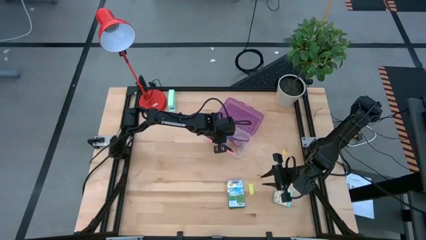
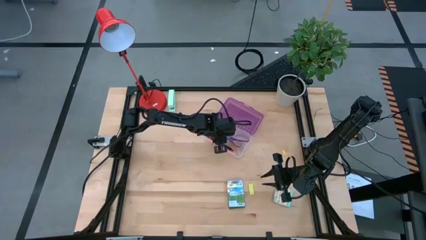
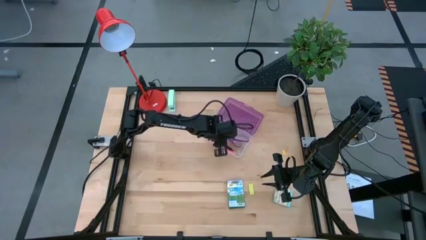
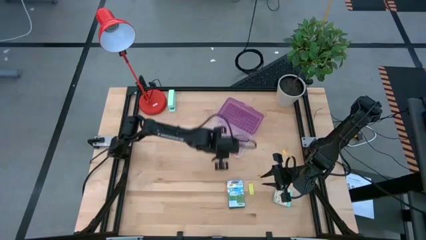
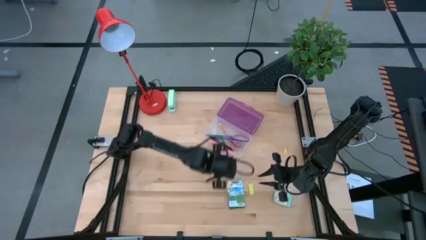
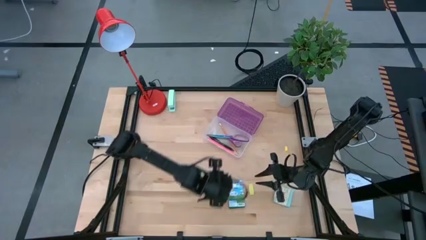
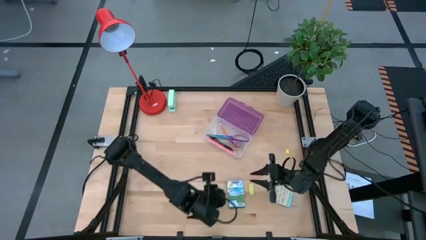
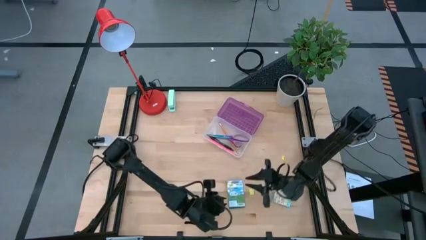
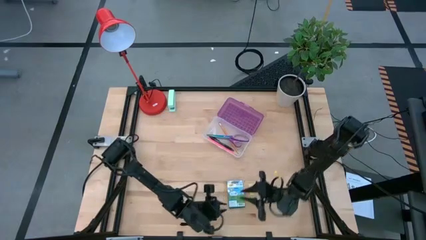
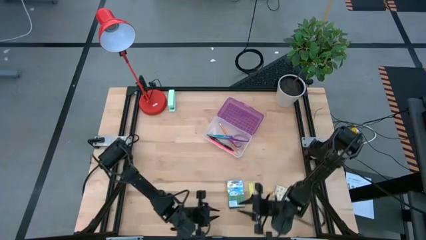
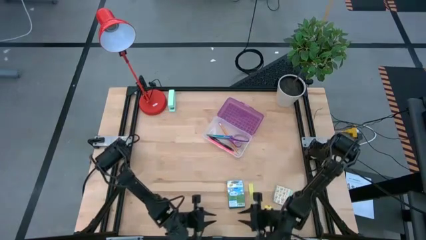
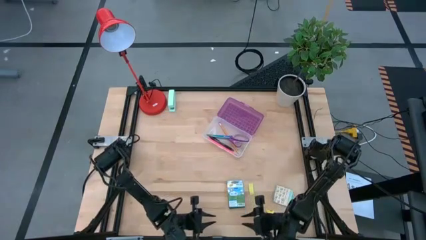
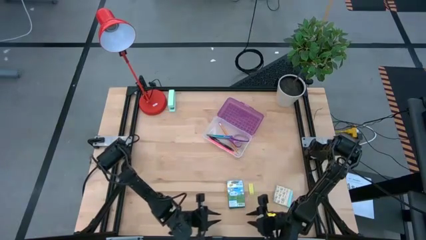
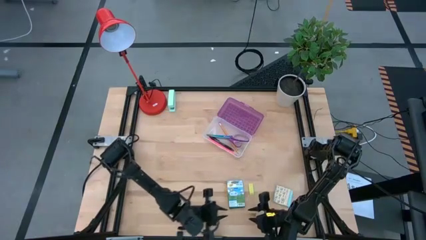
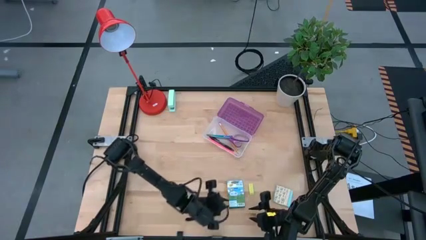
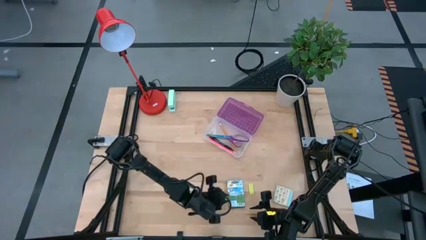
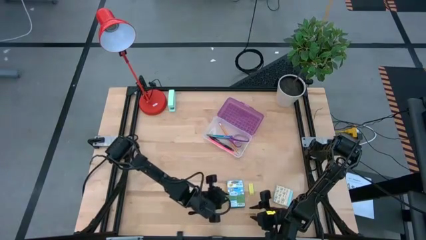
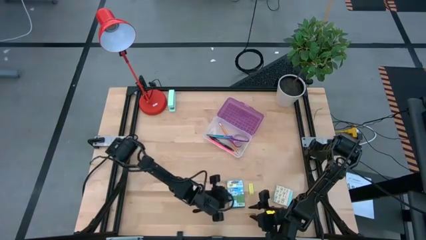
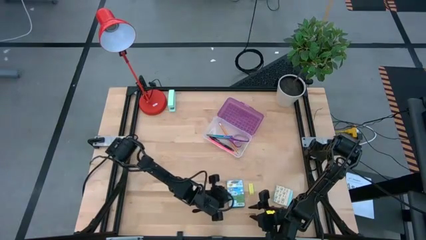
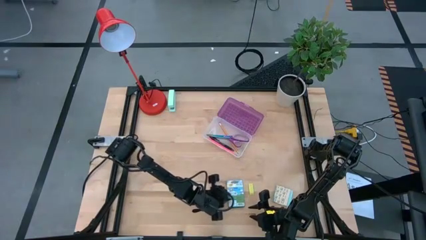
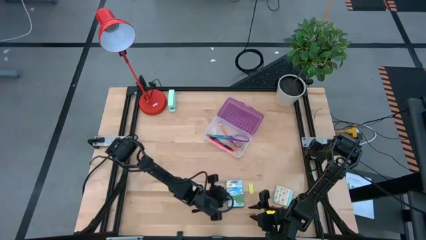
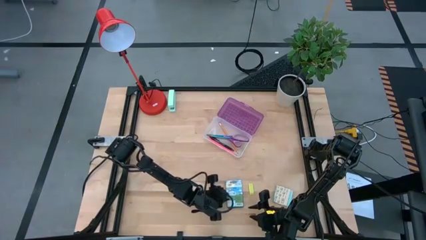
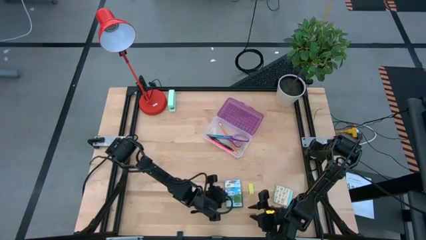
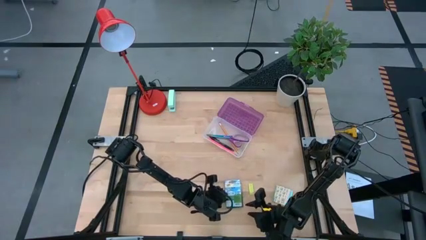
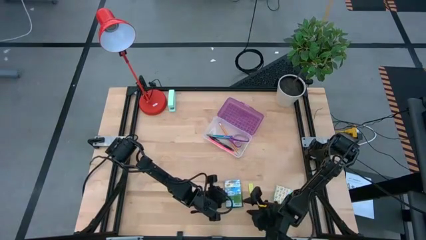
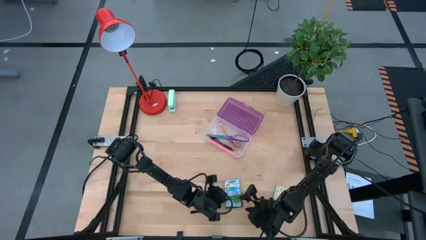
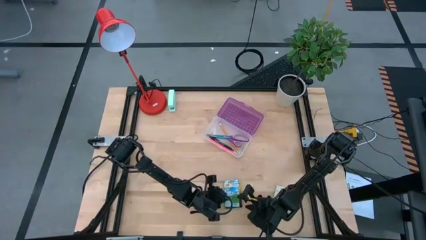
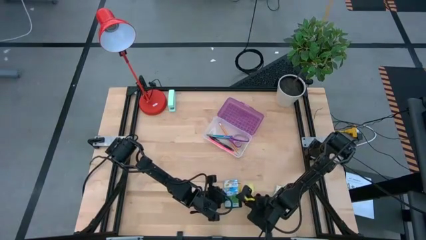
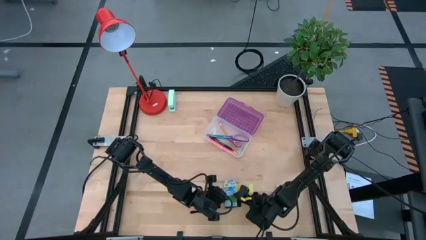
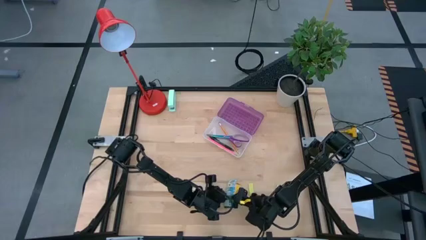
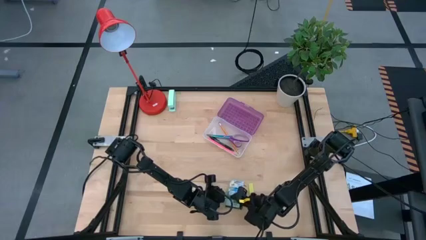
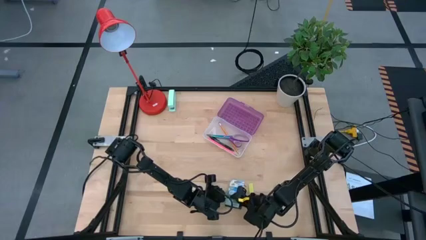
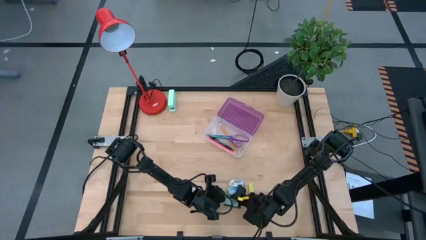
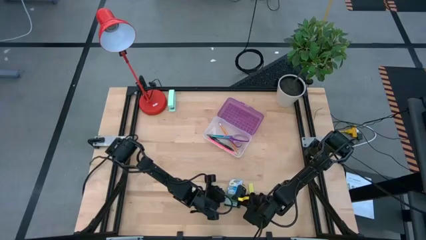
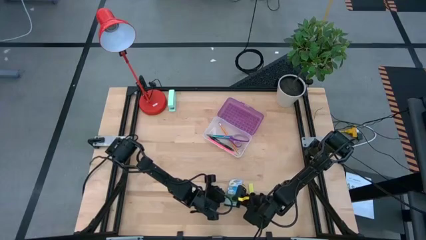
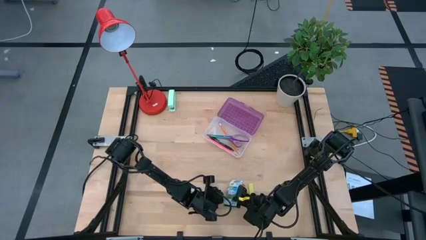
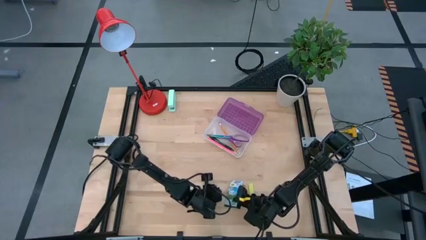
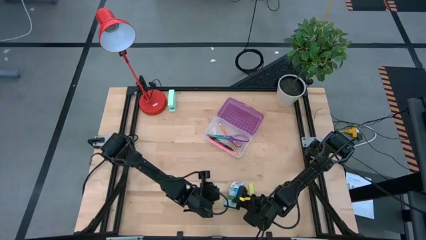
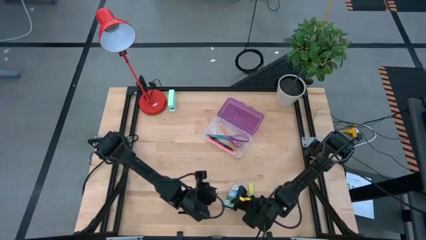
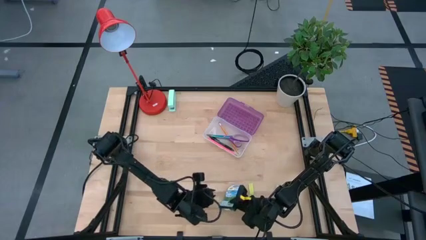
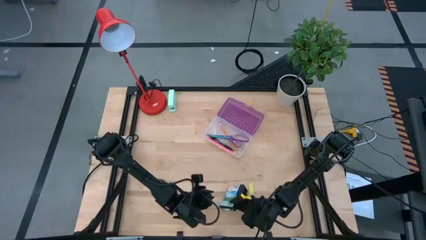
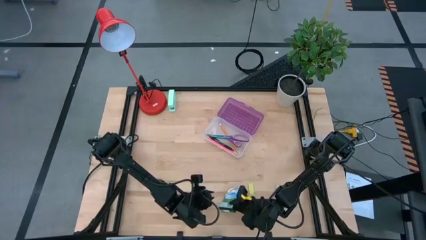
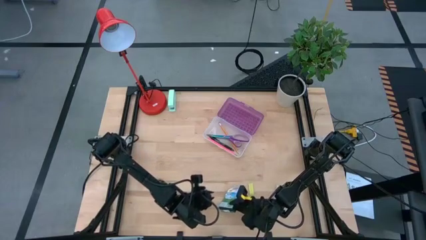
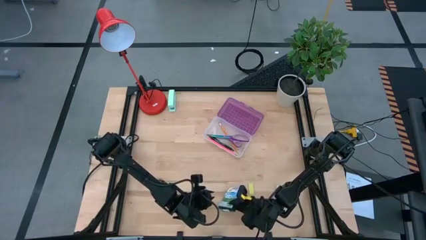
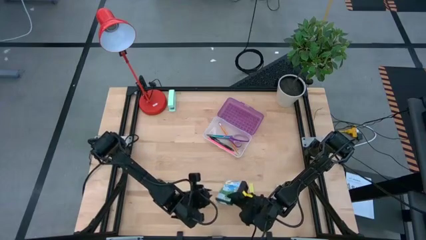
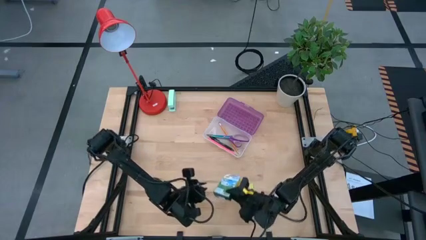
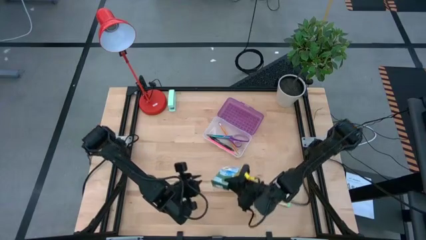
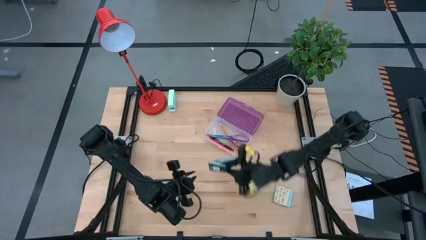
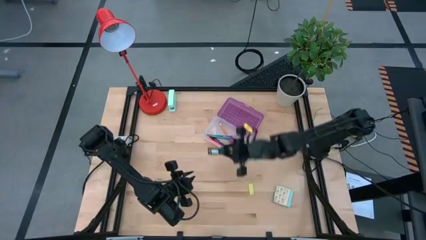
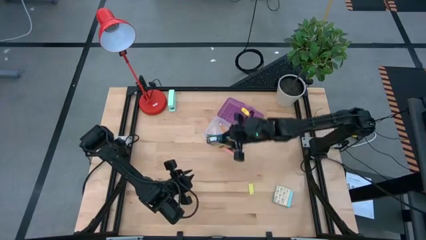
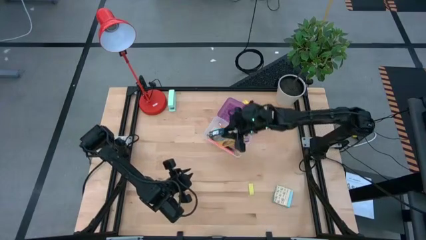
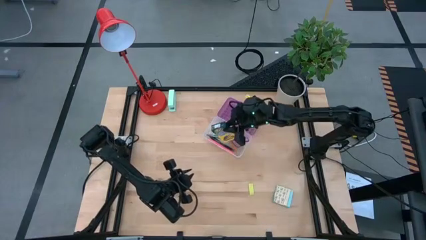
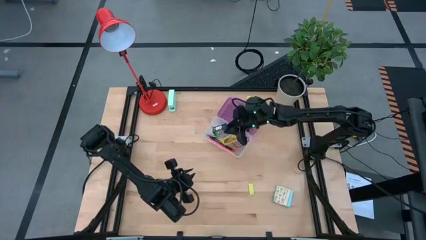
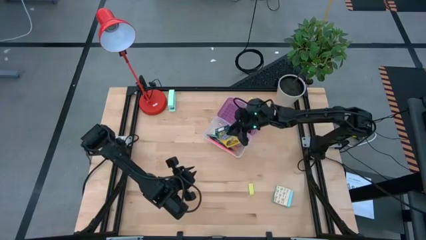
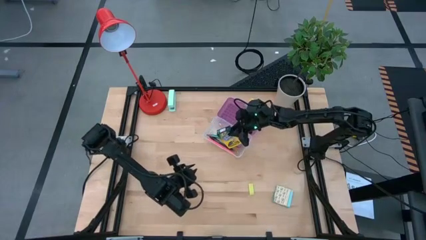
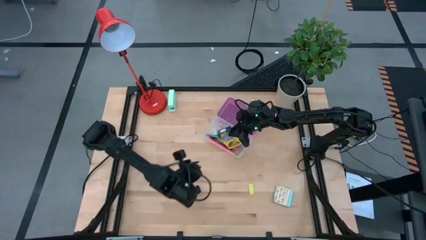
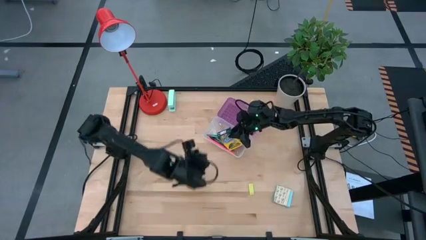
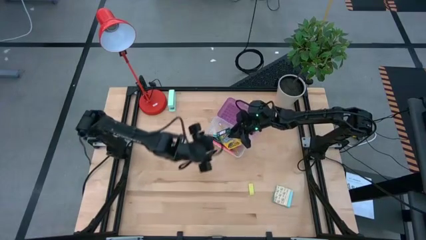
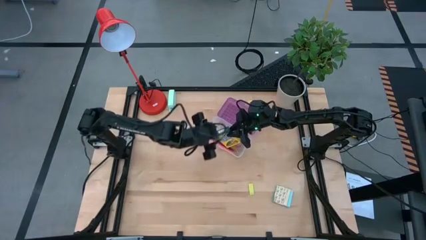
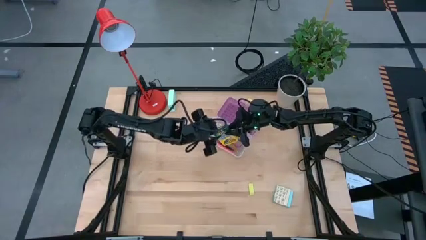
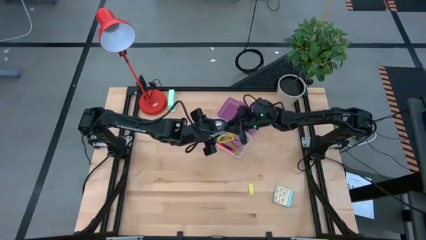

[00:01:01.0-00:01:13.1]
Task: Pack school essentials
Put the yellow crayon box into the purple supply box
